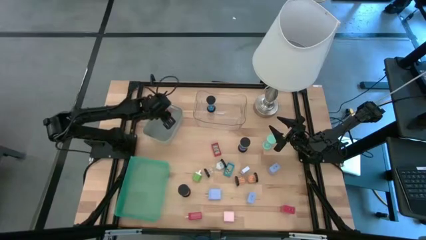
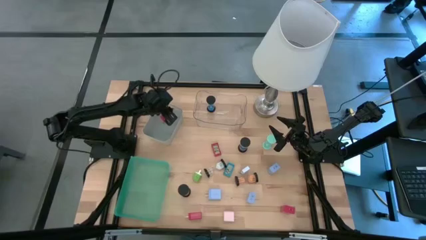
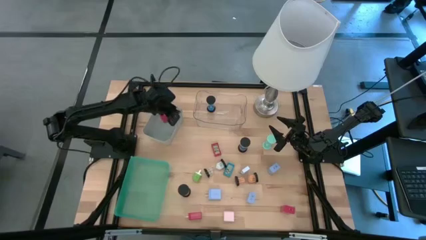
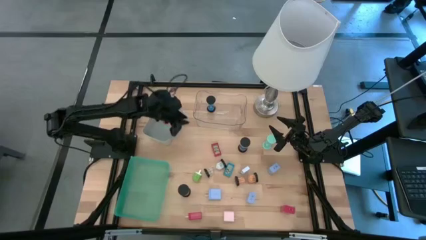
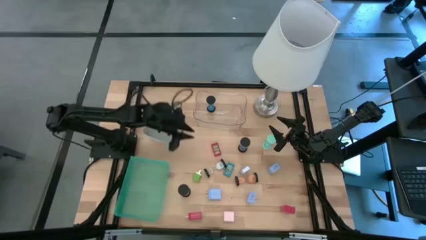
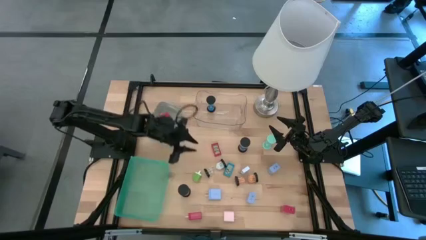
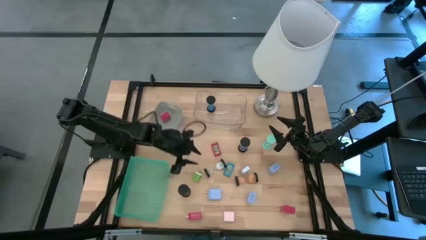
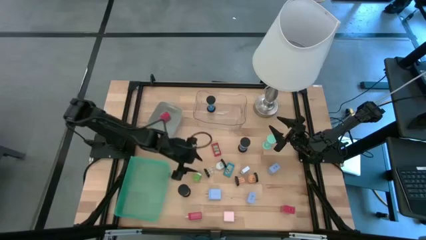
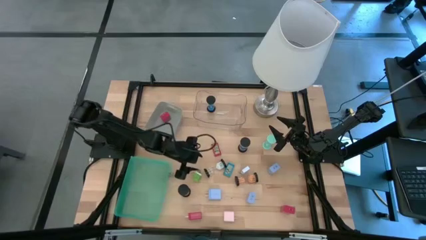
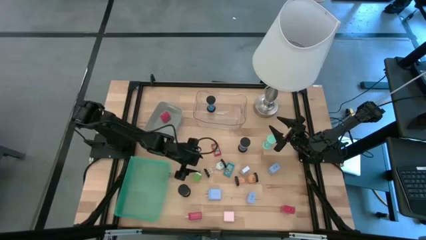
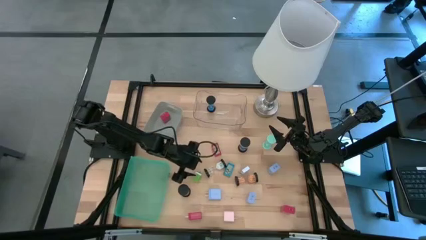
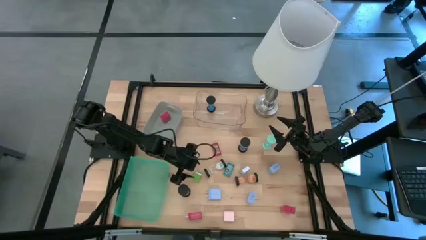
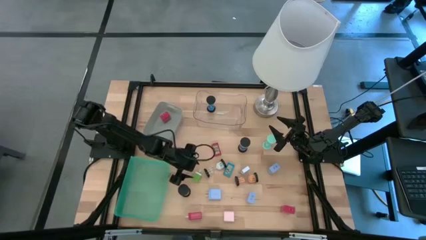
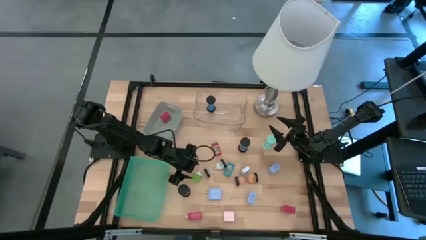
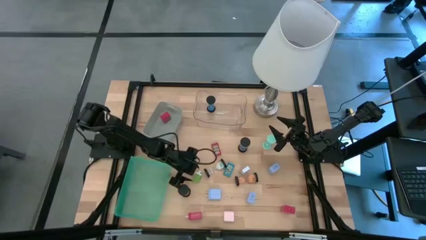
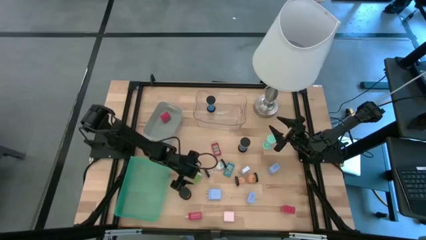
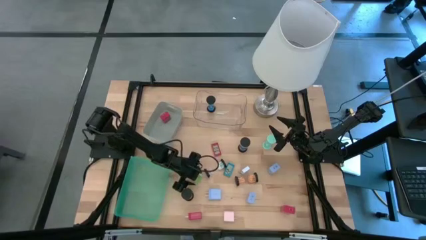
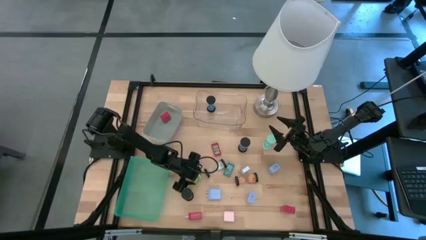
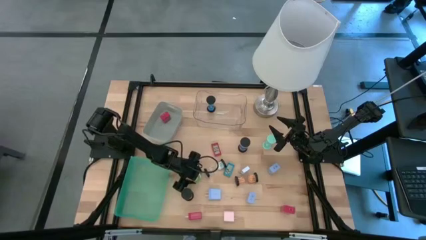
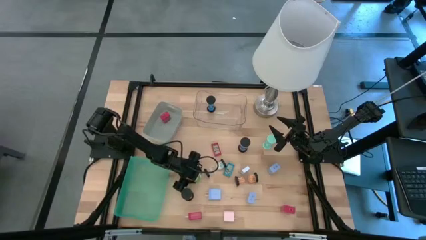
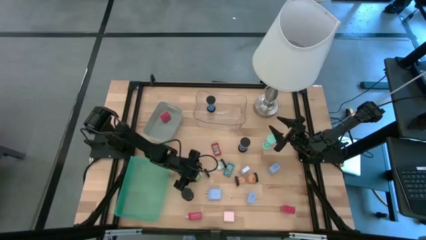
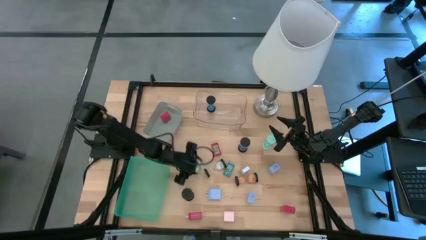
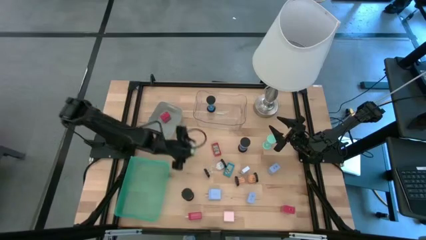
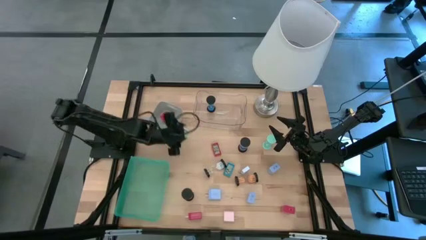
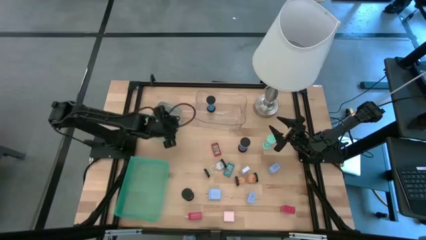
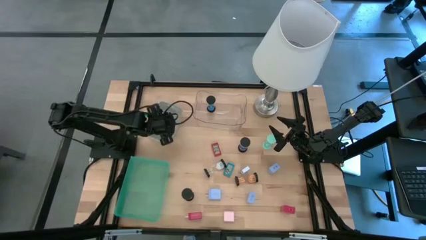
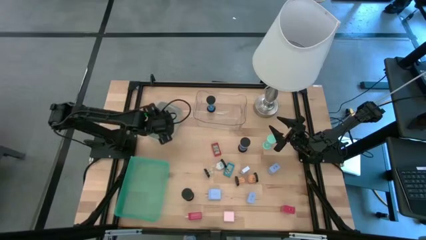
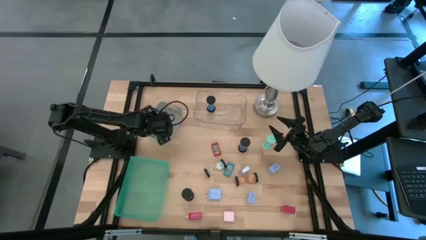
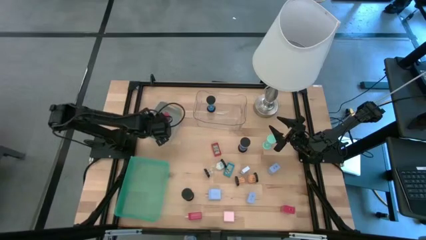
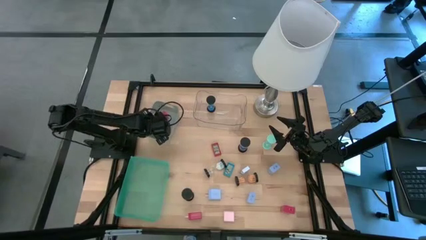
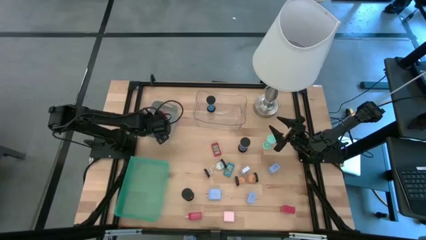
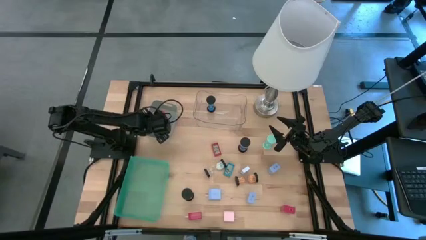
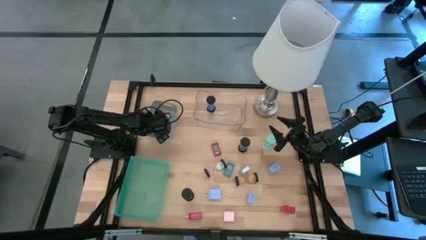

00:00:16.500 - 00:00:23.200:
Task: Pick & Place Office items
Put the green charger adapter into the gray bin

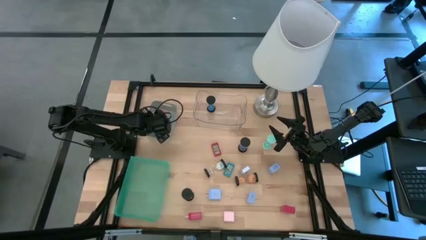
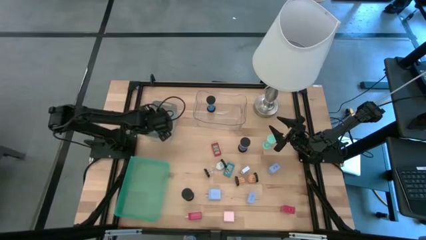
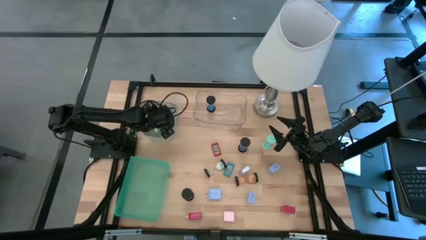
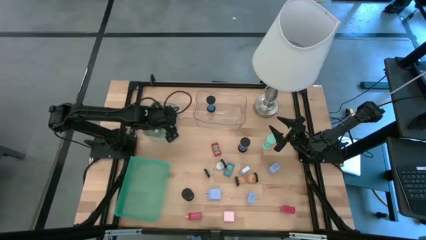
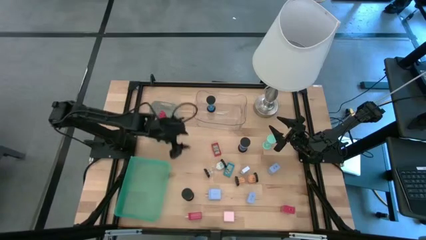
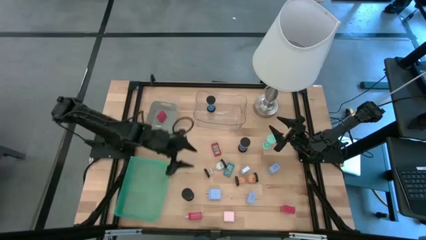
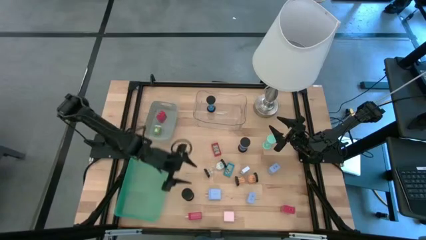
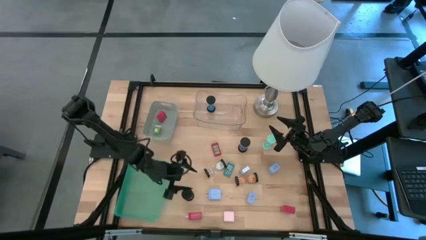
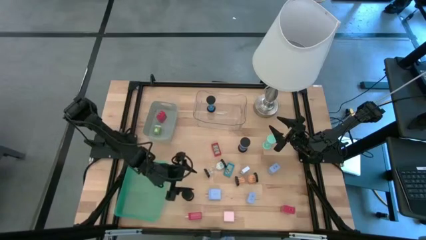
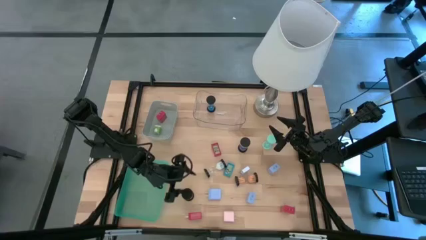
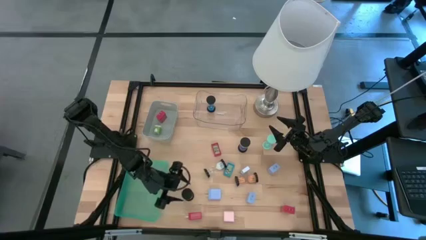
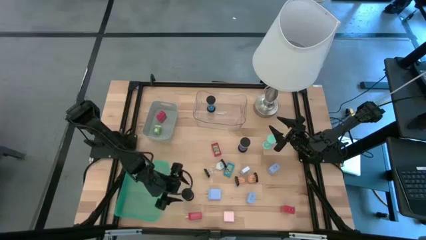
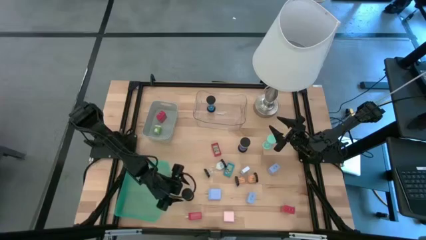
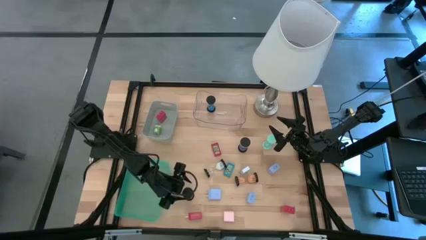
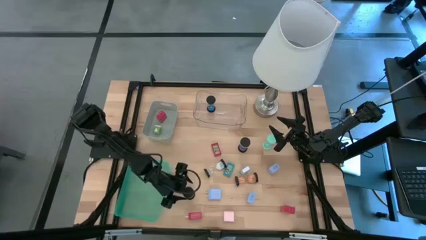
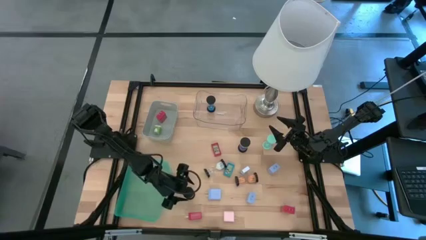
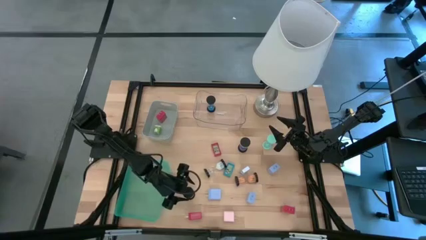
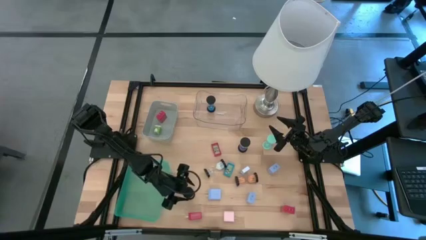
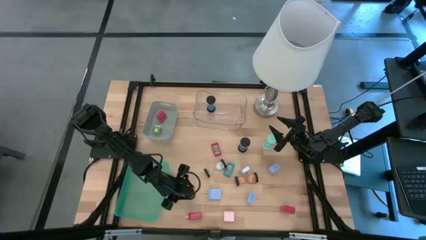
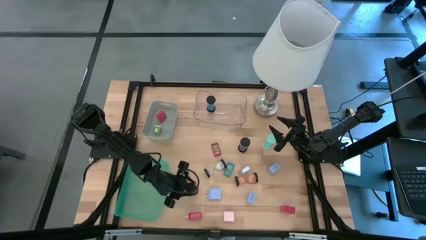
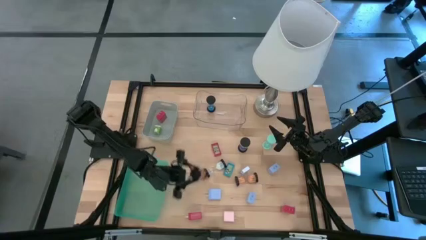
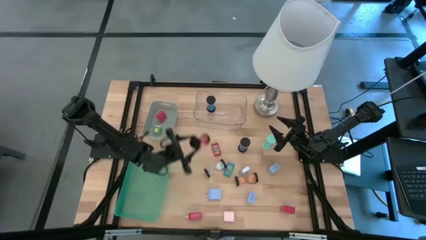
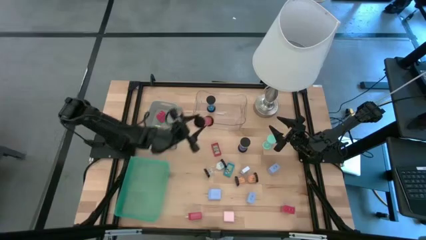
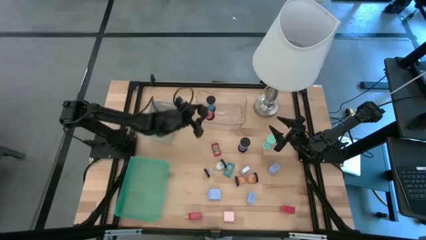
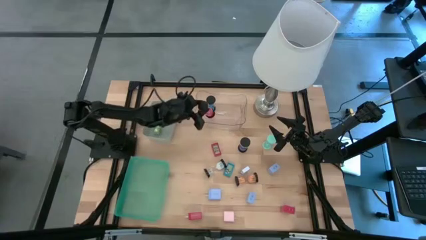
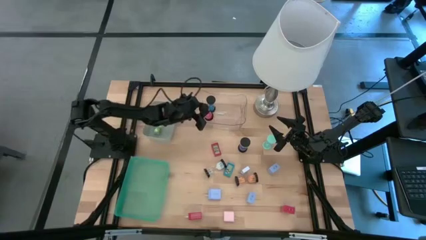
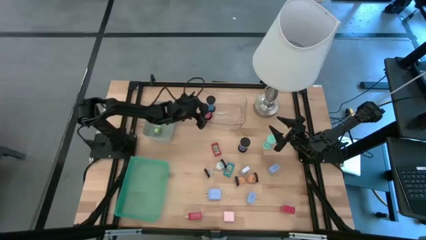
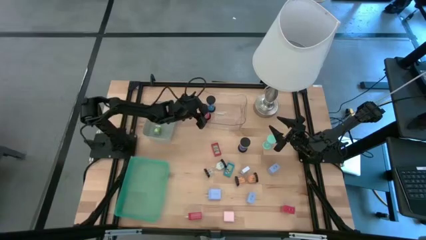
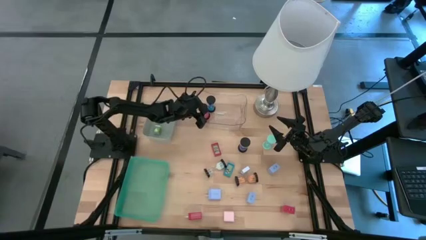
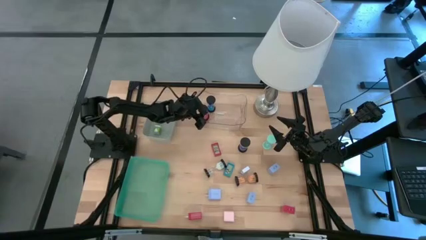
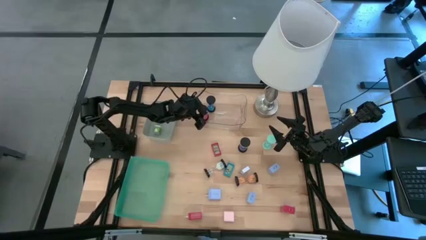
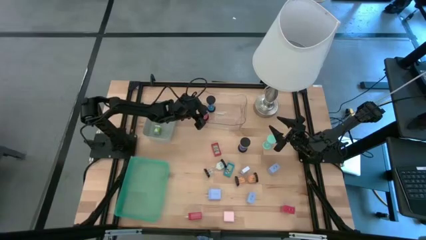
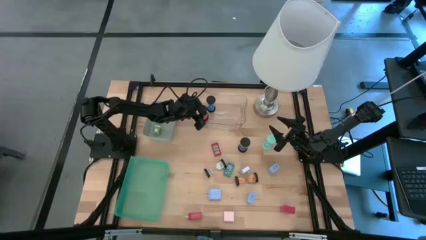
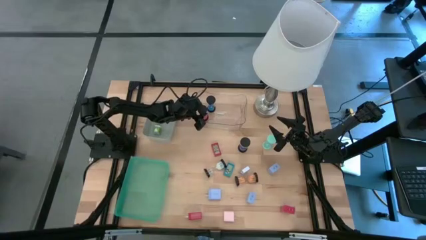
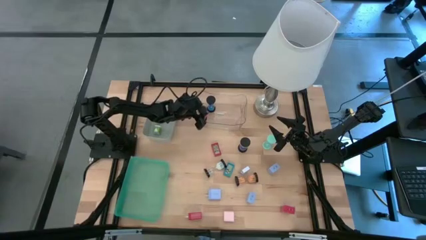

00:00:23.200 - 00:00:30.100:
Put the red hourglass into the transparent bin

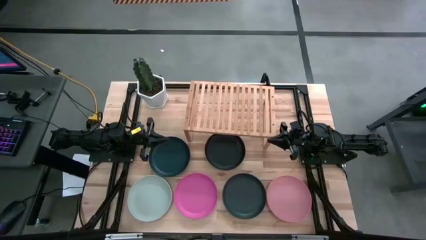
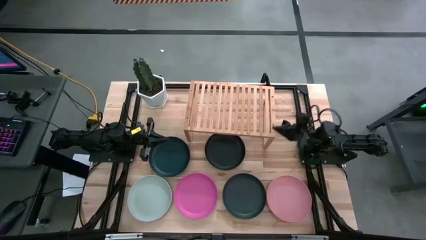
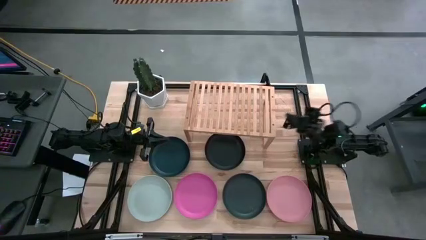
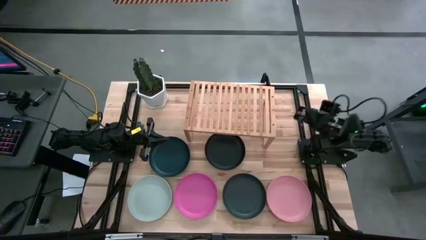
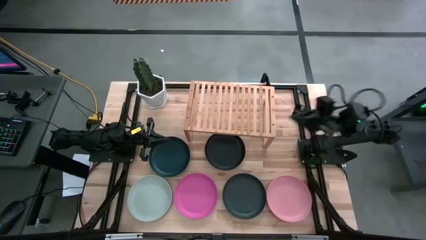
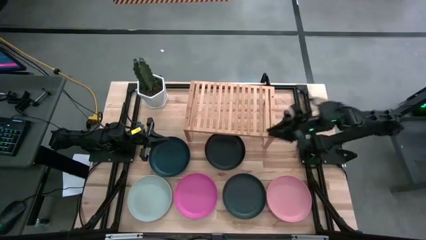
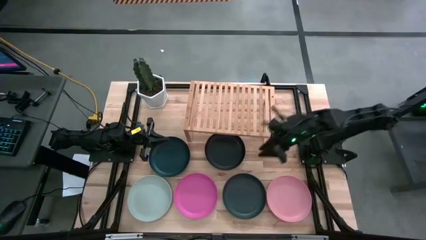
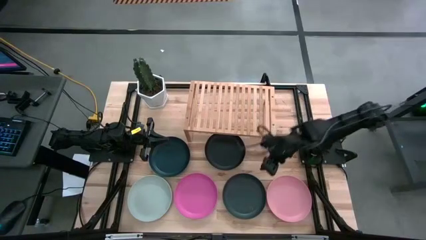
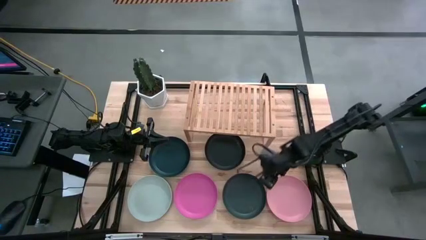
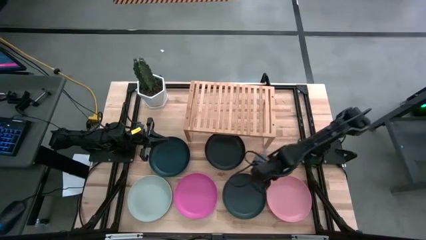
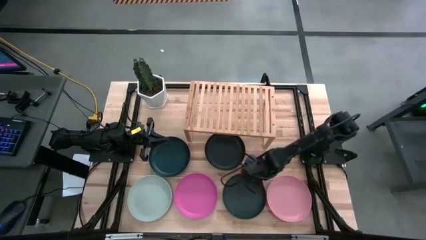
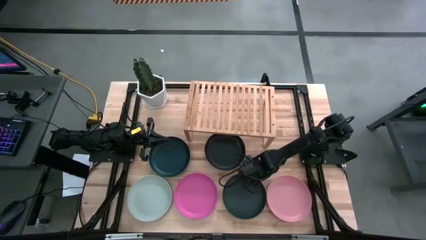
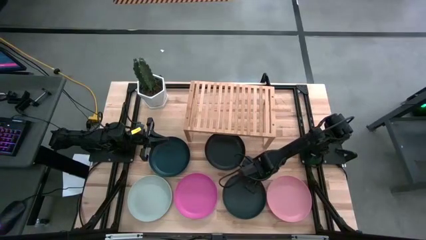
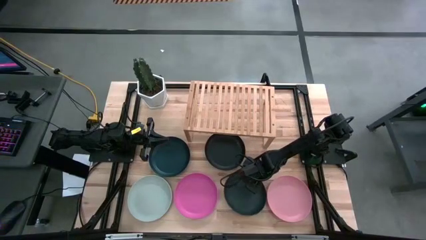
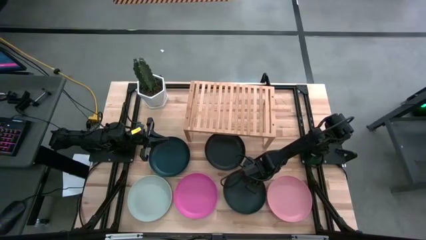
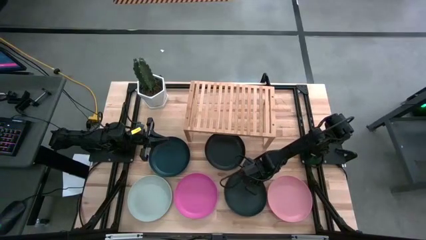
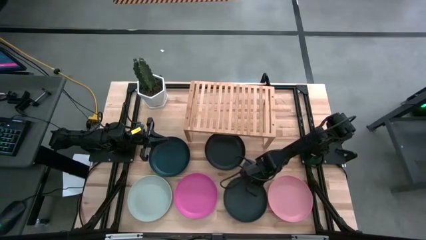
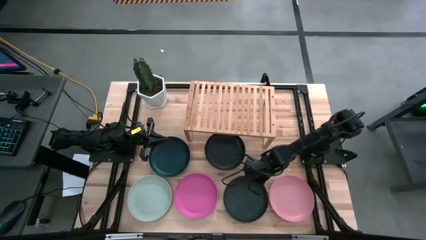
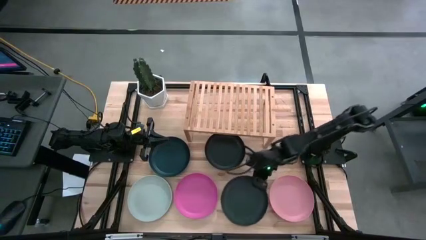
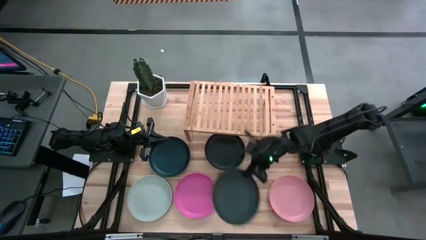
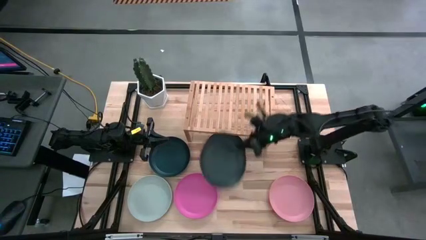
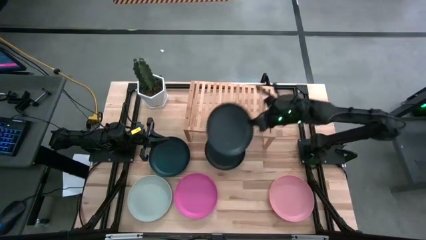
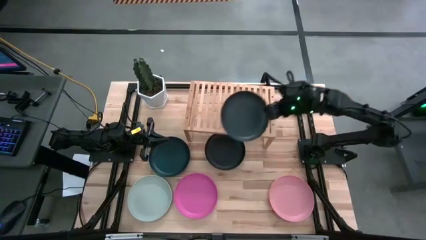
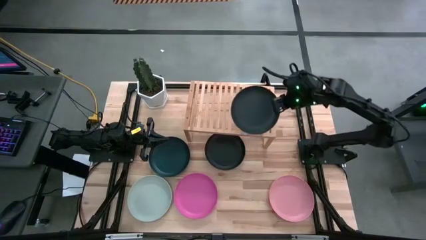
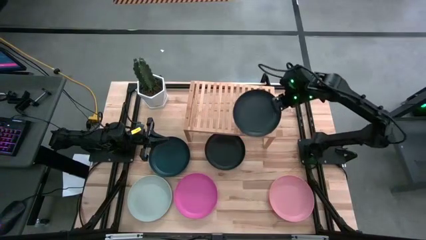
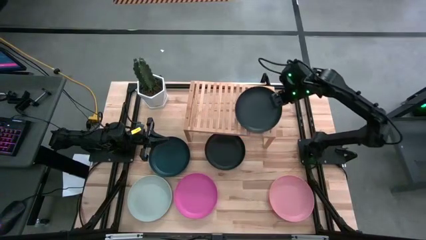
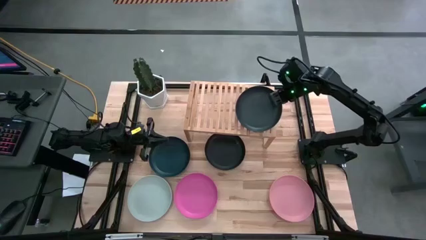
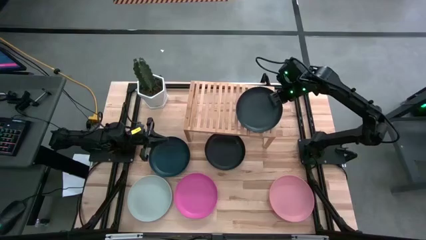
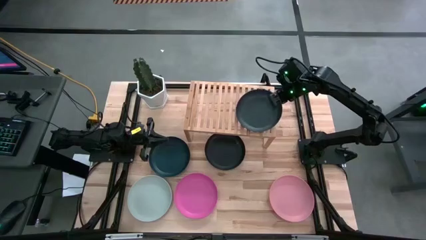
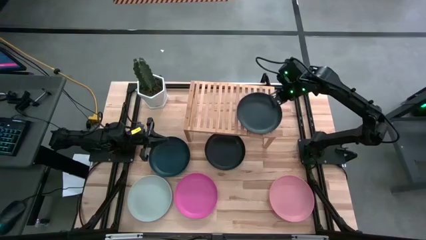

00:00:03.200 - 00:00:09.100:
Task: Place and stack plates onto a shelf
Put the bottom black plate on the shelf
